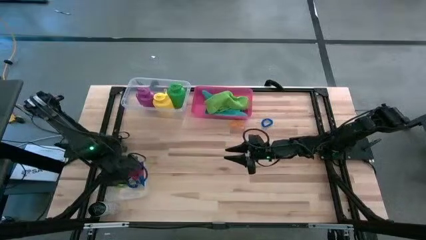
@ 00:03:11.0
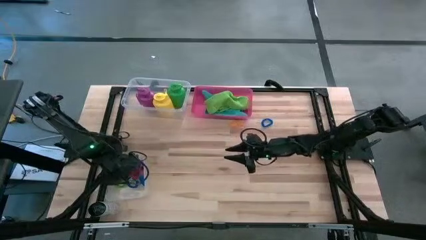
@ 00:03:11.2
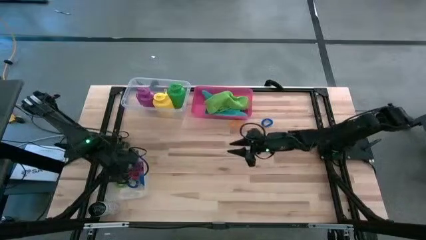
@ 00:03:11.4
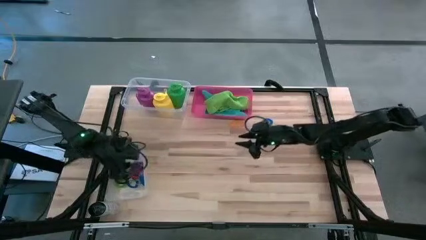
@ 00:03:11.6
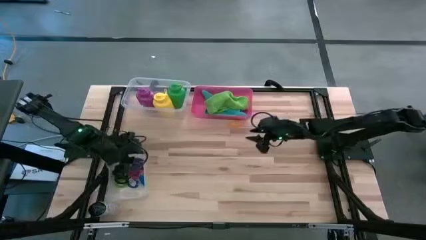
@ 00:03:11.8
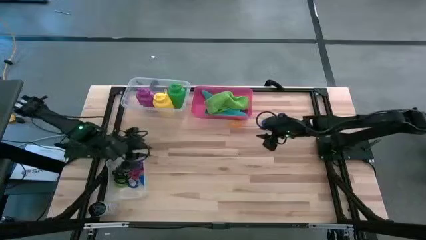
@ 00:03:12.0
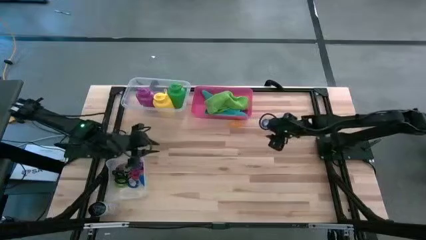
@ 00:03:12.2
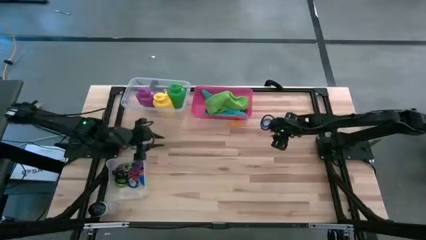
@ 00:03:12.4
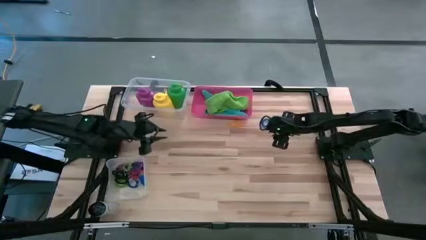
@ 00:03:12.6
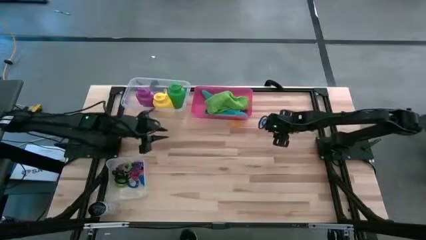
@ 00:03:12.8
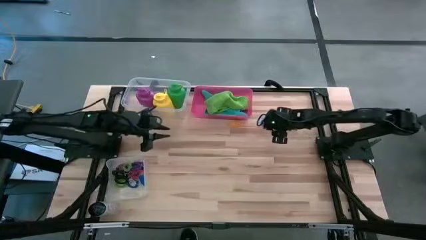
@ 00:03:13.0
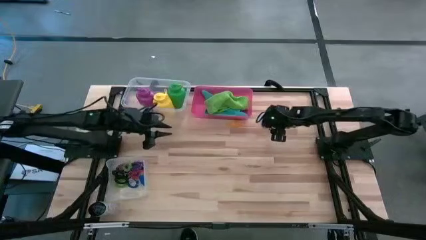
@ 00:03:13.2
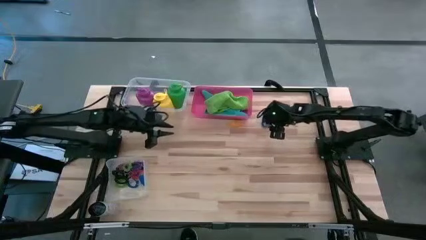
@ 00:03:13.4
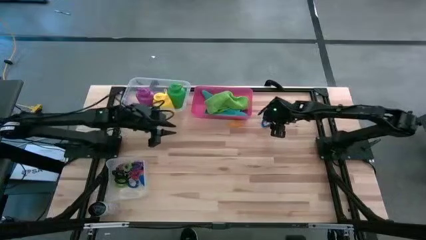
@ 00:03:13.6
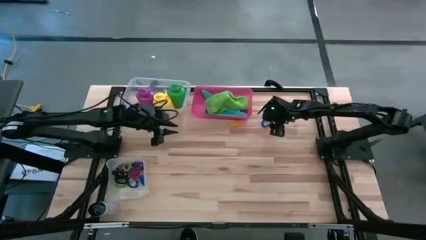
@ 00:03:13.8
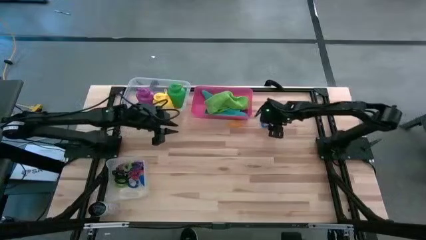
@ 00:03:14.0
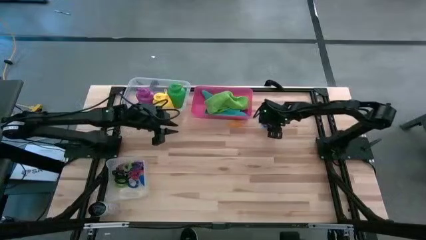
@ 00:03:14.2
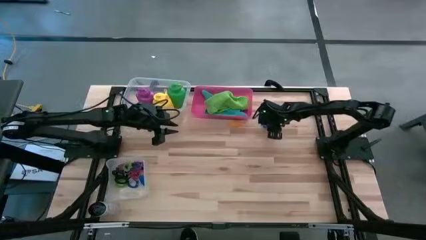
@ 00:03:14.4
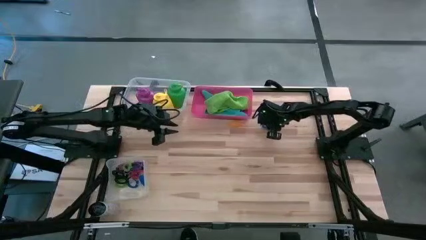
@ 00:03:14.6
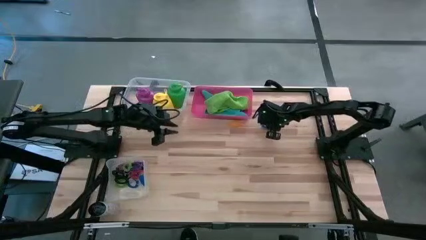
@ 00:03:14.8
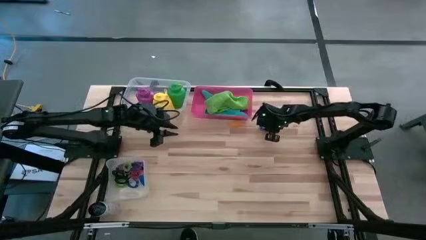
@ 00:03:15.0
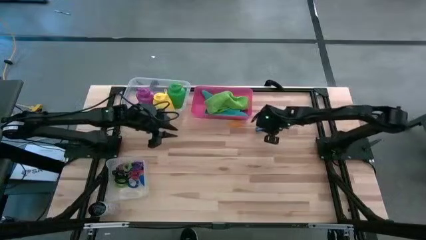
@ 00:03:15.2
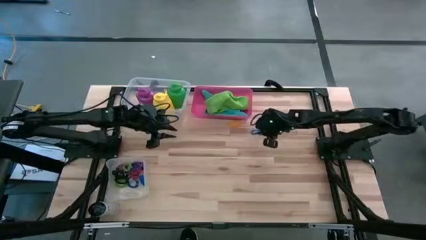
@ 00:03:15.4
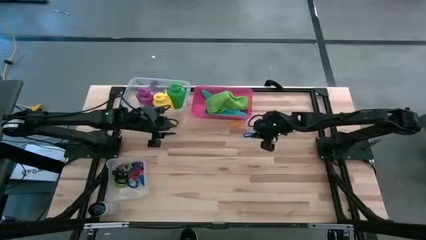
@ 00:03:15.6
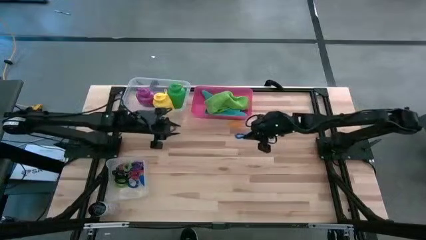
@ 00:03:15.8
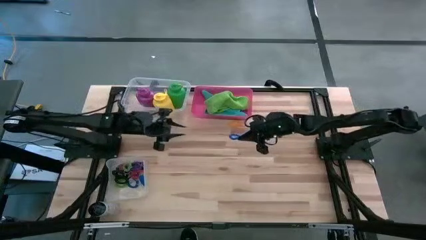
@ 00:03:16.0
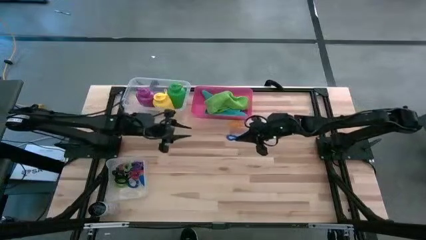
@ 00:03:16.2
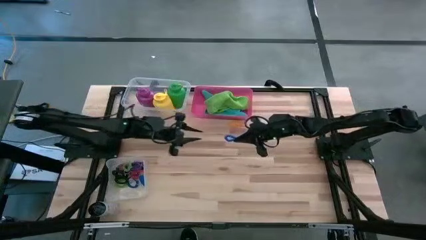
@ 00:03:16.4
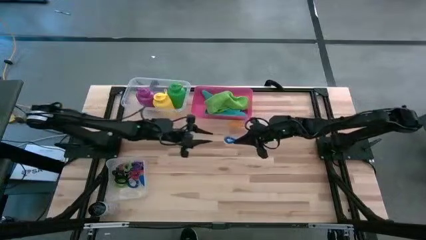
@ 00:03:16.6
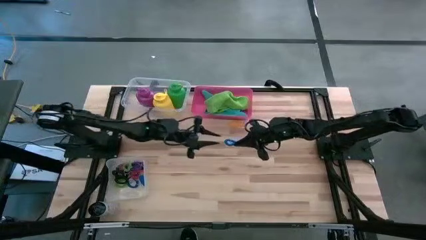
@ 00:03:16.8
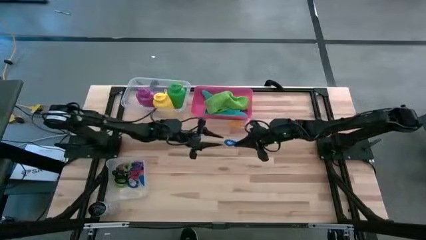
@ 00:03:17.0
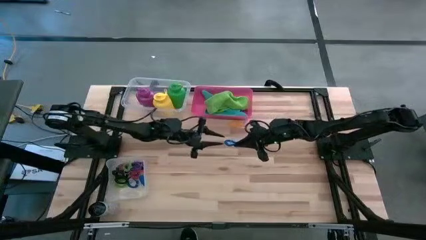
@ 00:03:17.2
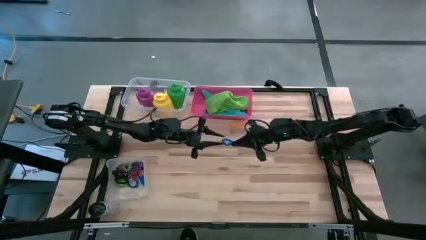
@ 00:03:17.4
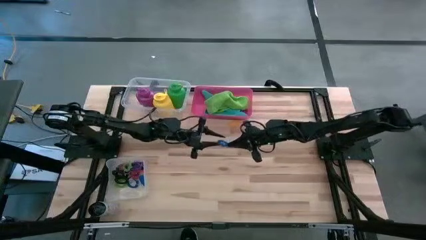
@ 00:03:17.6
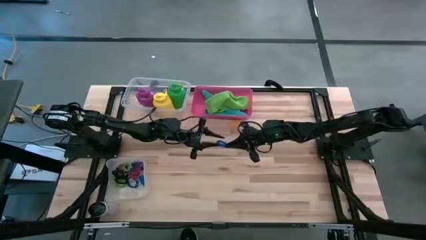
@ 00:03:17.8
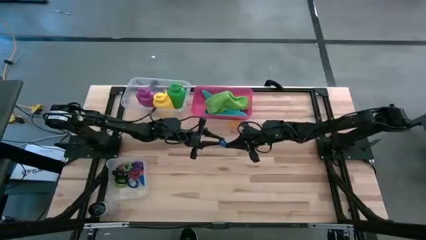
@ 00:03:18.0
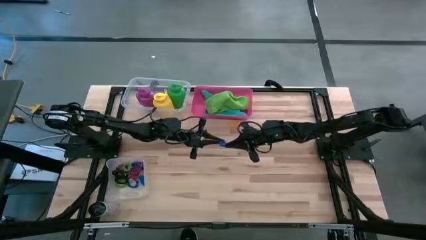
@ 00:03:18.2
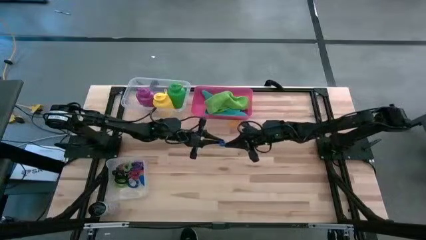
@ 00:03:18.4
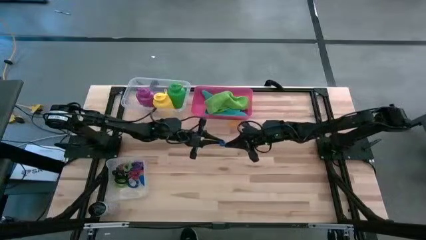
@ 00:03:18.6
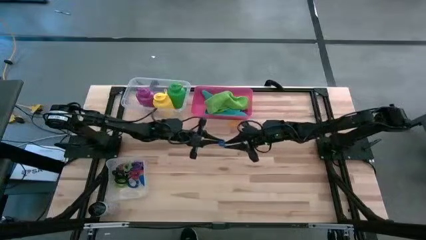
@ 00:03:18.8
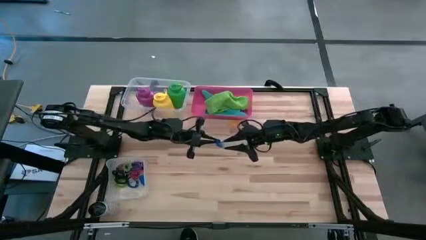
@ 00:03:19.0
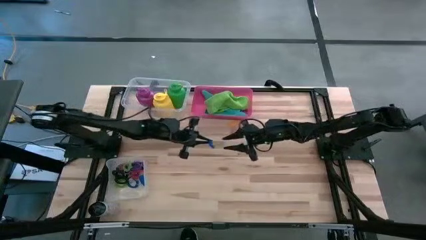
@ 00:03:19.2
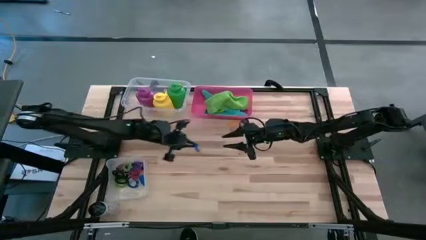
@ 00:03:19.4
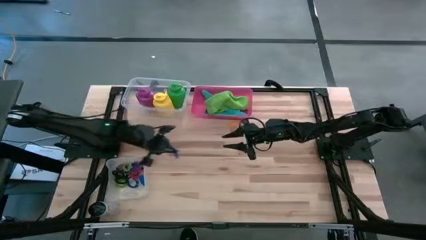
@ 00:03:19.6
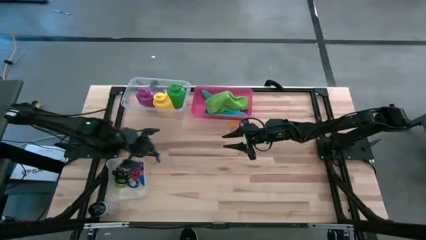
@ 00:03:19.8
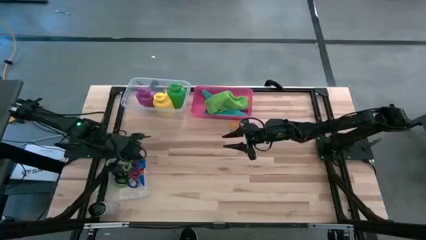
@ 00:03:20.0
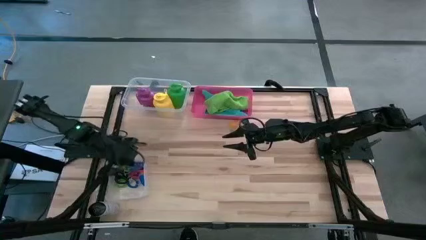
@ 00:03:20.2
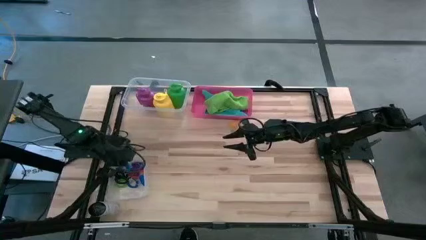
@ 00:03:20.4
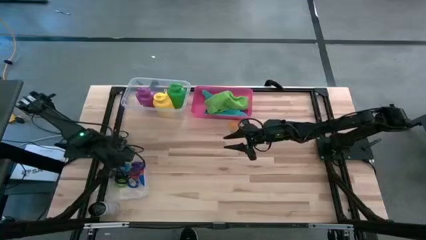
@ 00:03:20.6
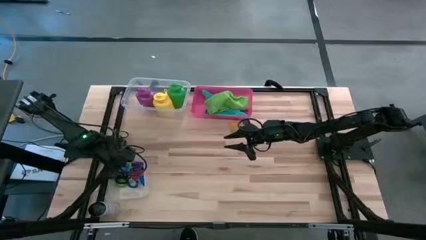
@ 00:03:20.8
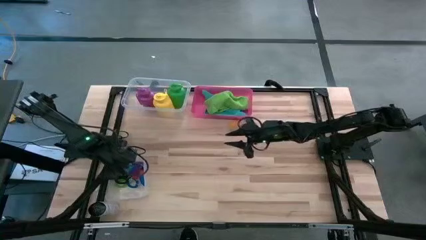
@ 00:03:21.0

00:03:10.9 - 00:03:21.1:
Task: Pick & Place Sports Items
Put the blue spring keychain into the bottom transparent bin

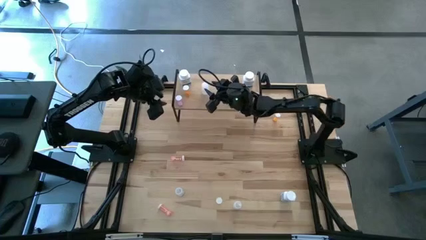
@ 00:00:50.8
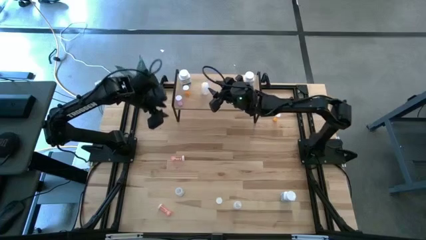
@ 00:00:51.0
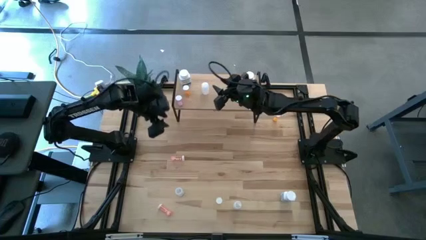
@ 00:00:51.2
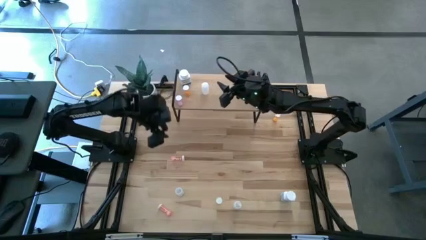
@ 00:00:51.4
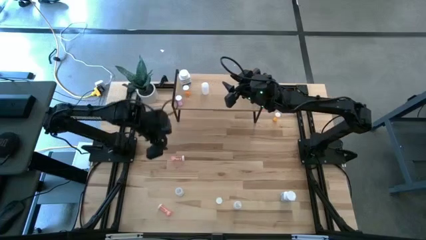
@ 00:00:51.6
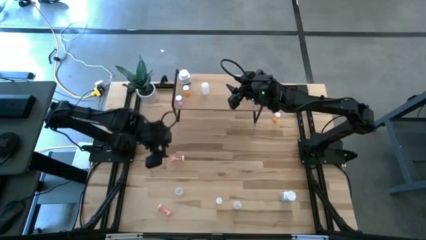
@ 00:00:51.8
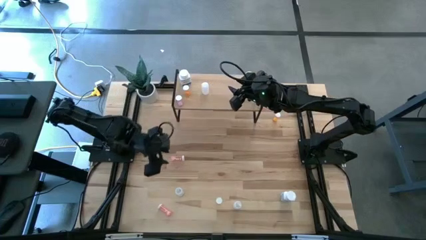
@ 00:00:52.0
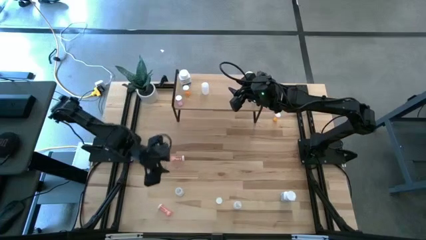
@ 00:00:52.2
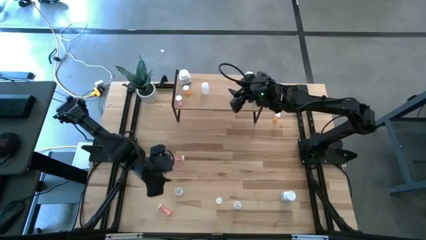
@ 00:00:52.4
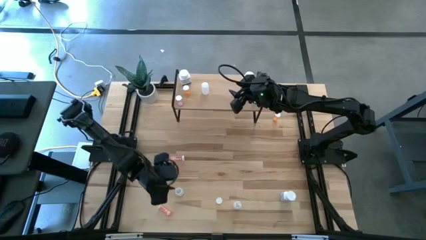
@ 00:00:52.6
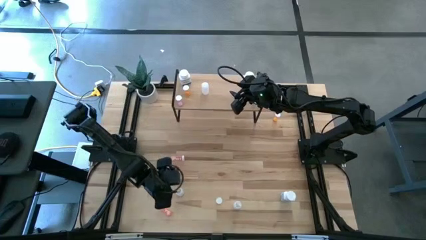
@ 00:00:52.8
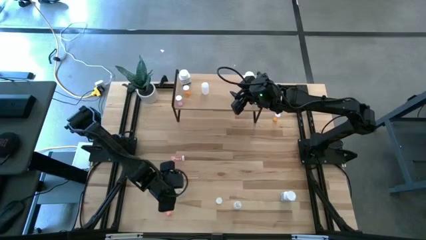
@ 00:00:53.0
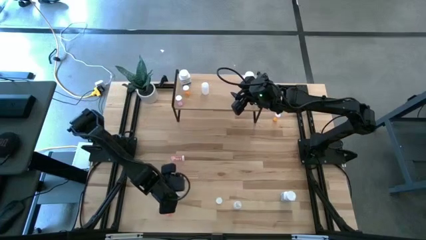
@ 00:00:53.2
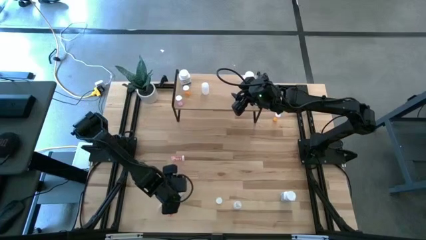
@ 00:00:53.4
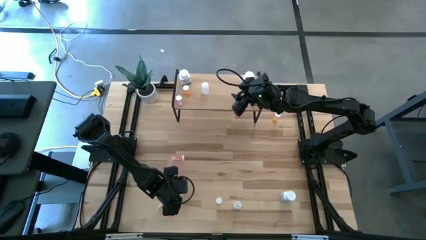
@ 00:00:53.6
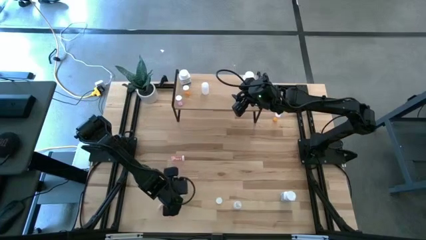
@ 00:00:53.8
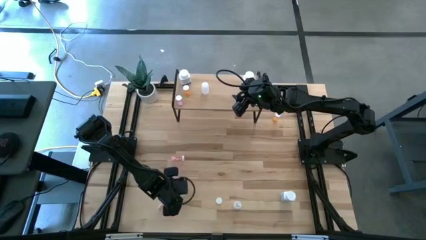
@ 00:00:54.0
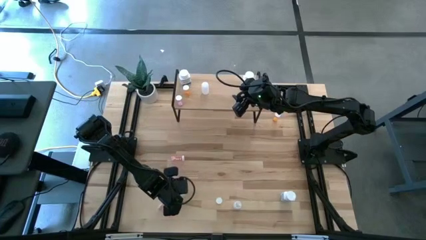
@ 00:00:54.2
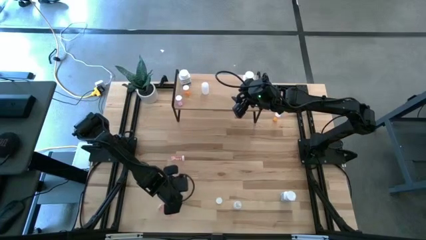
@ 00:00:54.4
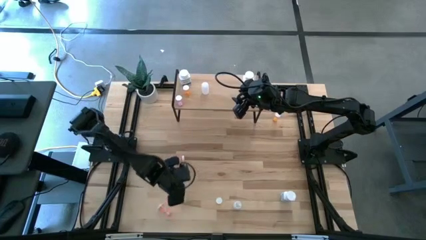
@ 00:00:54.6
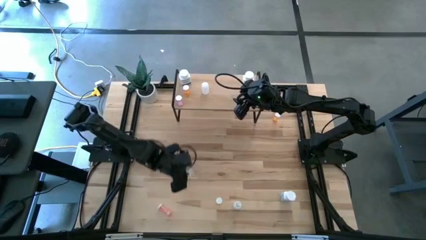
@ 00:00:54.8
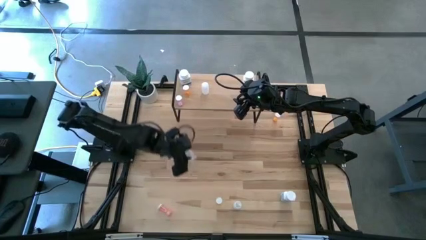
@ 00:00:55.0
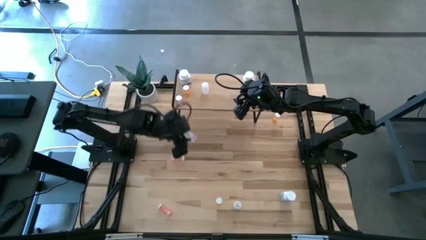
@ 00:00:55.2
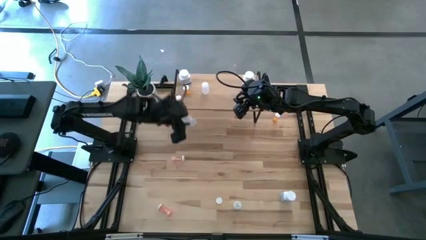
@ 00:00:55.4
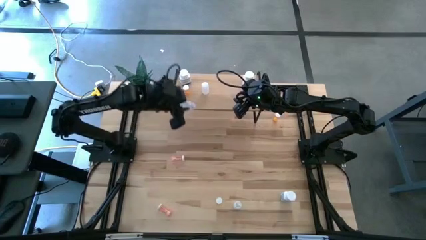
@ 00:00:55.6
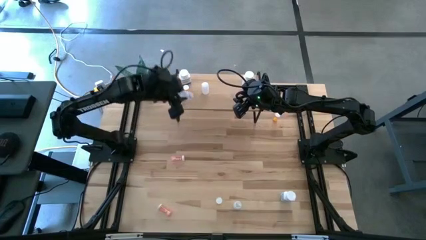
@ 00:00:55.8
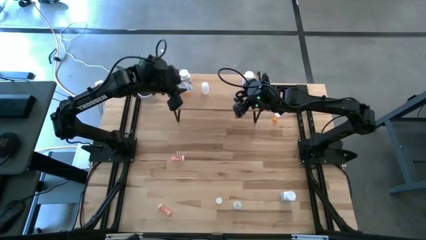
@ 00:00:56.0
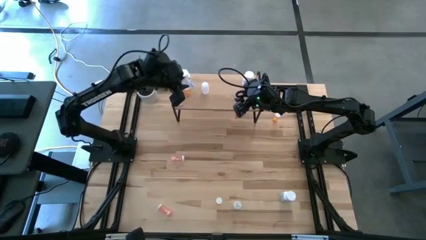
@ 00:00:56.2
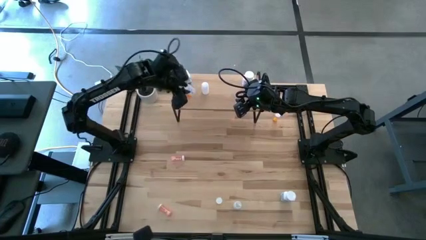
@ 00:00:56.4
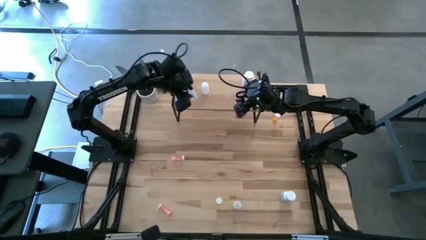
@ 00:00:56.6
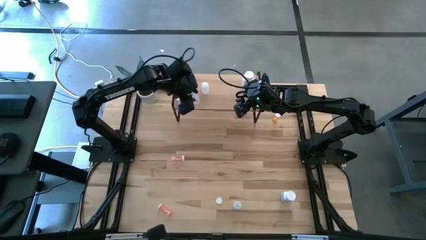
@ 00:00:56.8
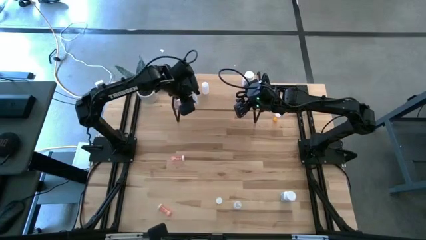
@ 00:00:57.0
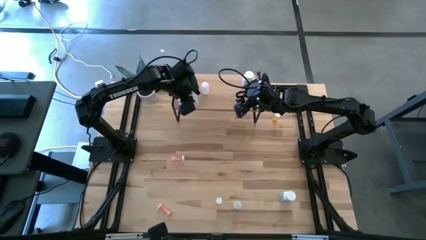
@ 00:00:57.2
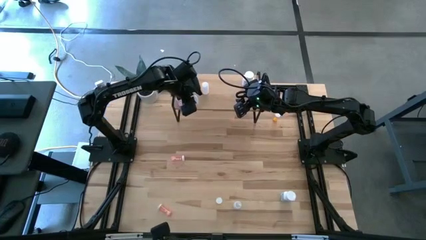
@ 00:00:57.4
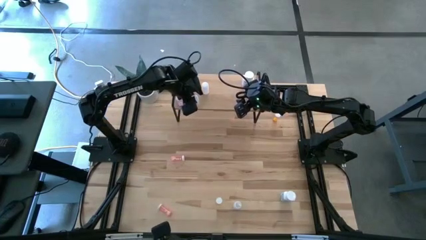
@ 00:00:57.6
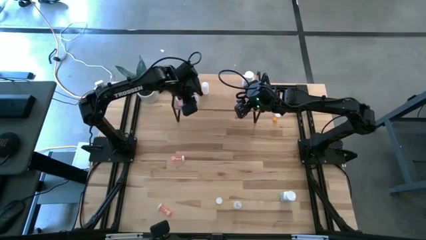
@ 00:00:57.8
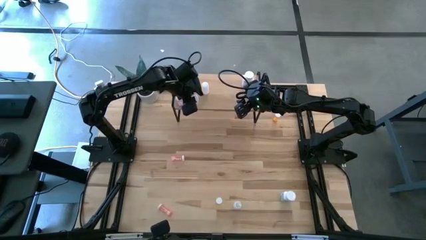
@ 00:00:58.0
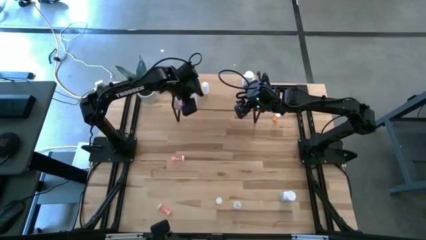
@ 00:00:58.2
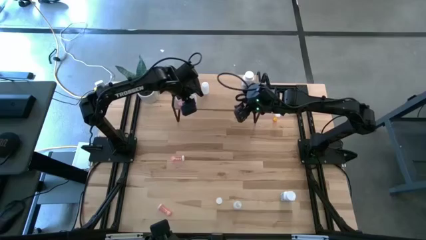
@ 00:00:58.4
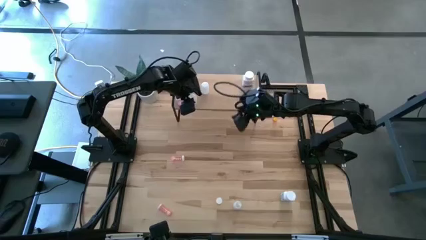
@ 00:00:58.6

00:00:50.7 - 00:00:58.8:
Task: Pick and place medicine bottles onto shelf by color
Put the left transparent pill bottle on the shelf
